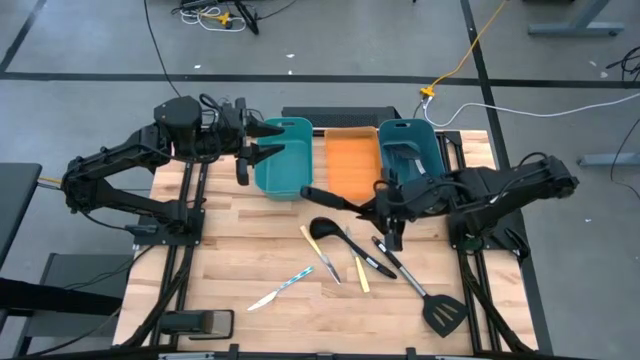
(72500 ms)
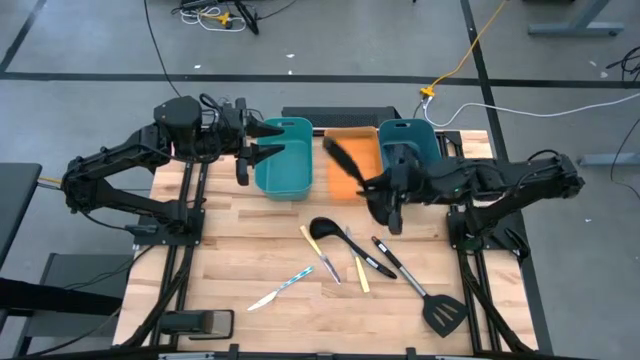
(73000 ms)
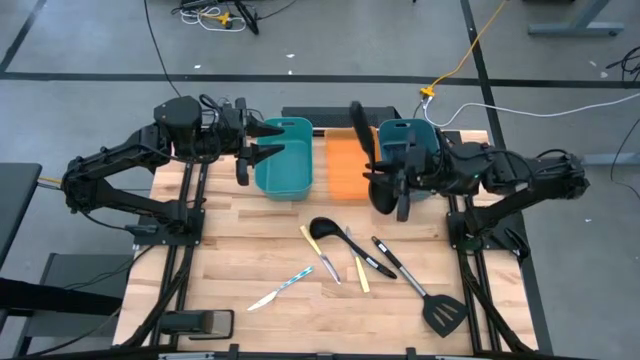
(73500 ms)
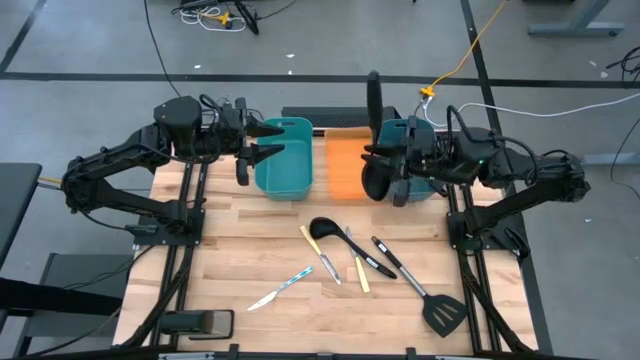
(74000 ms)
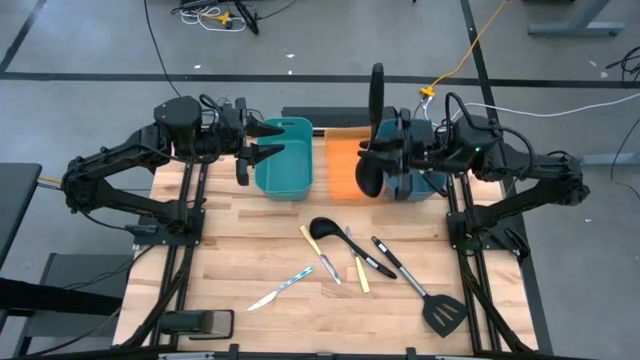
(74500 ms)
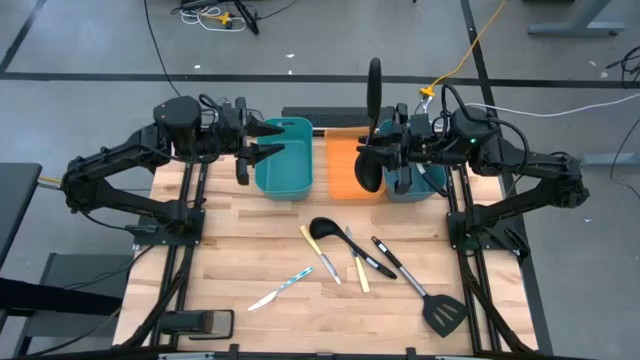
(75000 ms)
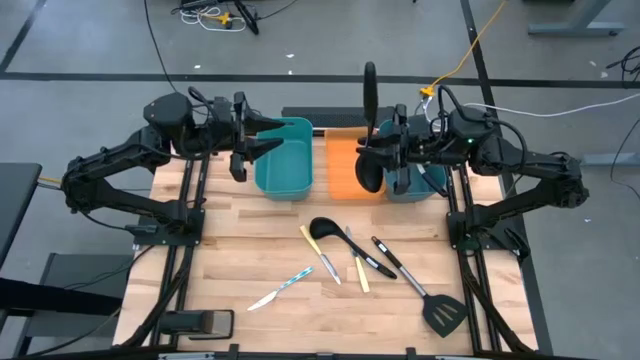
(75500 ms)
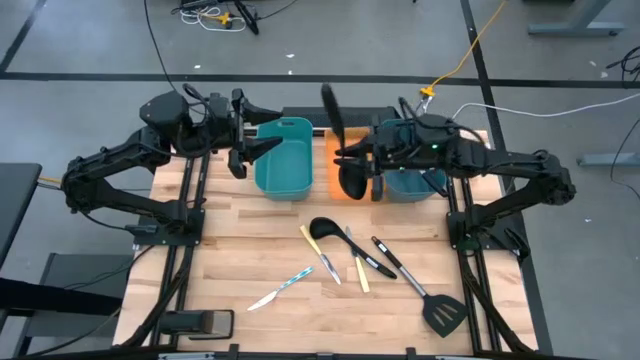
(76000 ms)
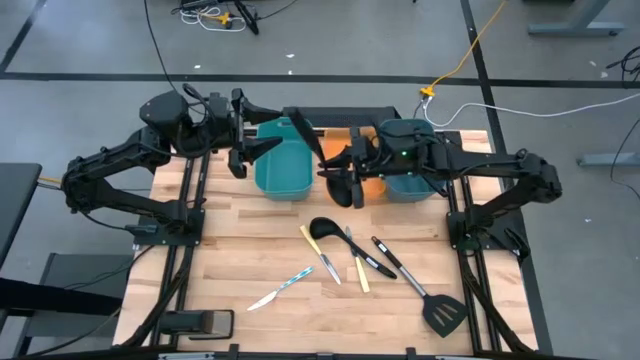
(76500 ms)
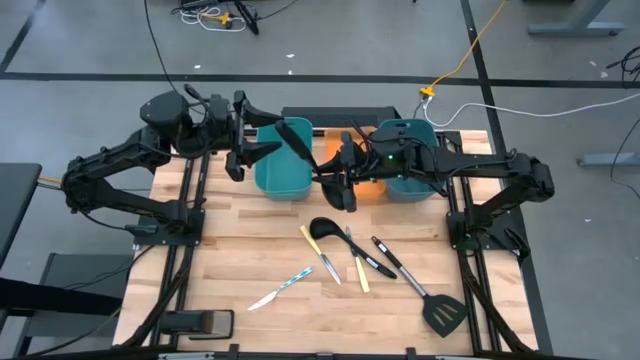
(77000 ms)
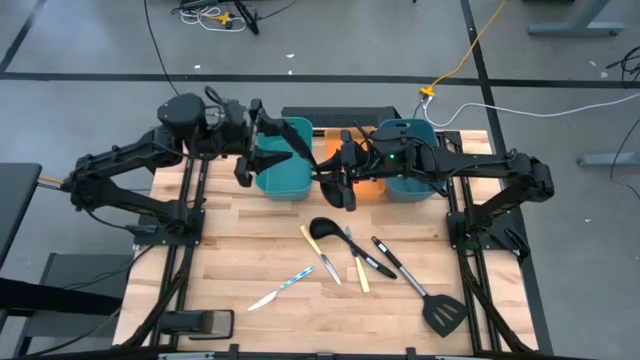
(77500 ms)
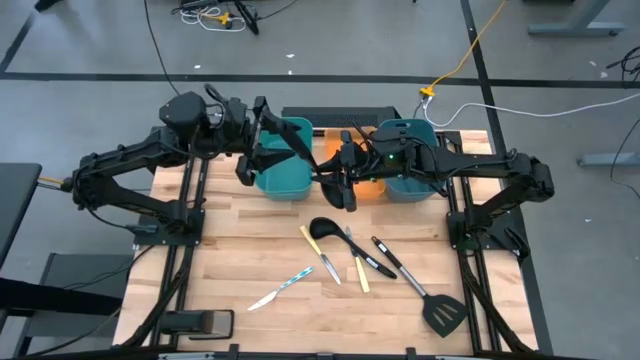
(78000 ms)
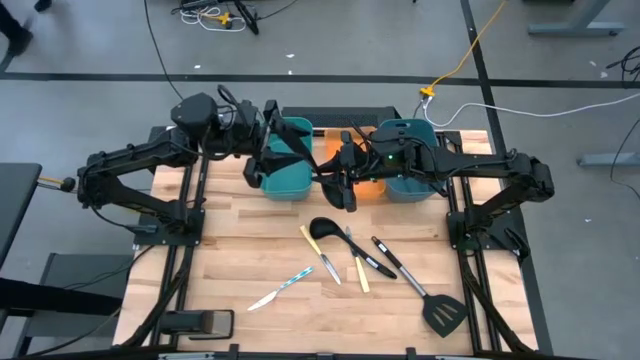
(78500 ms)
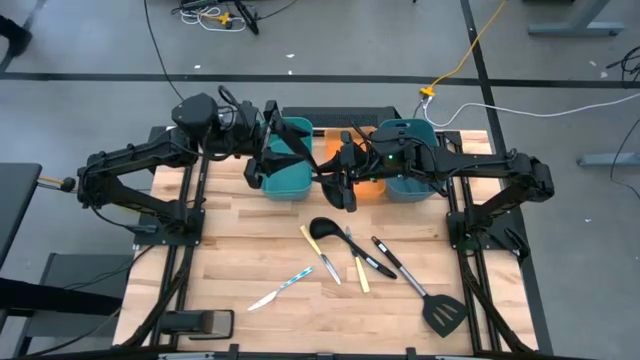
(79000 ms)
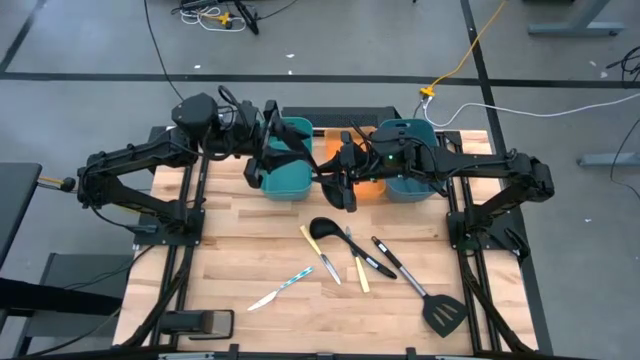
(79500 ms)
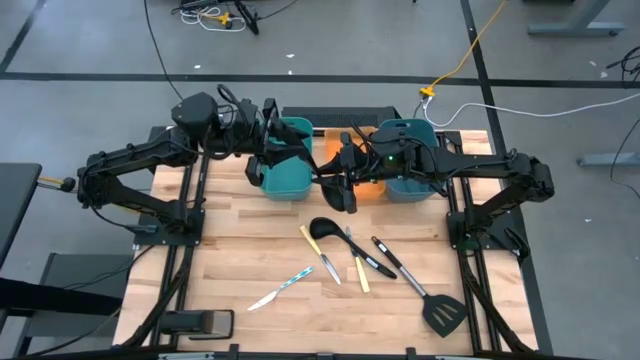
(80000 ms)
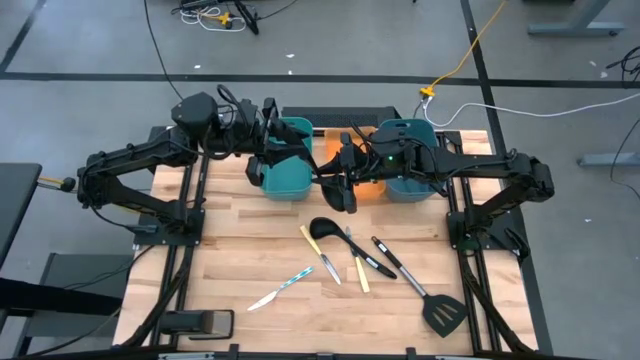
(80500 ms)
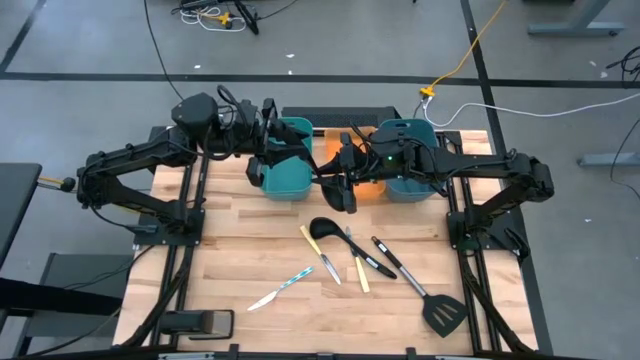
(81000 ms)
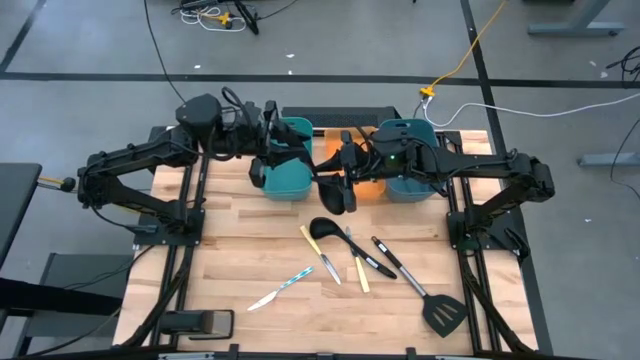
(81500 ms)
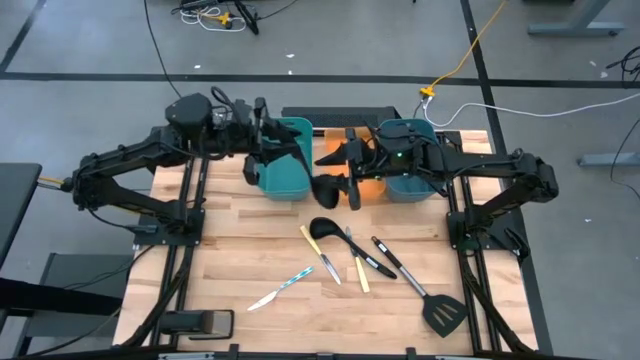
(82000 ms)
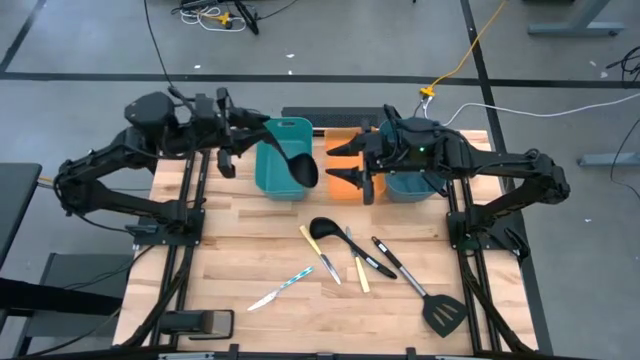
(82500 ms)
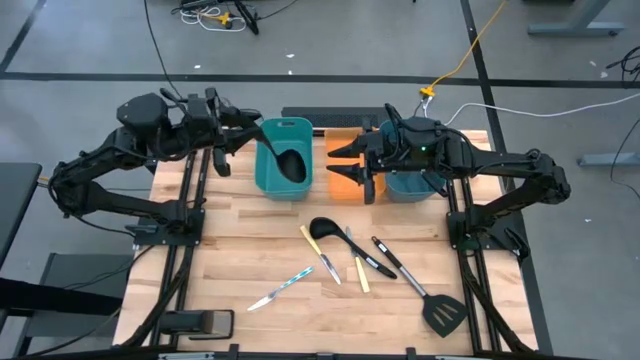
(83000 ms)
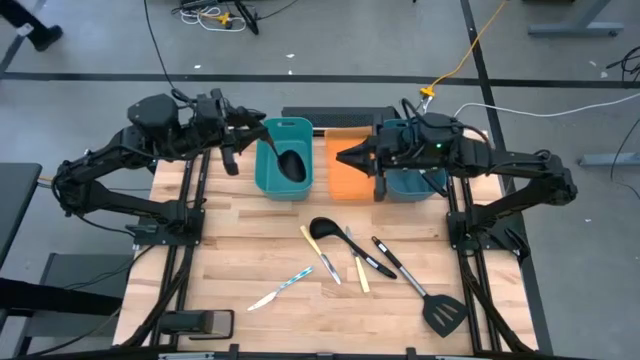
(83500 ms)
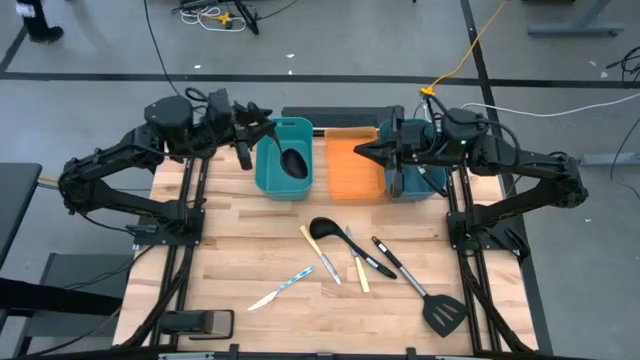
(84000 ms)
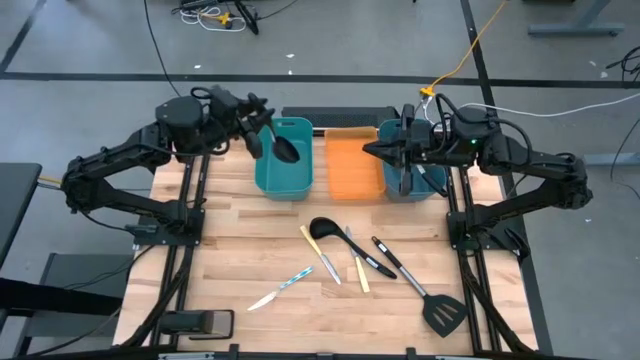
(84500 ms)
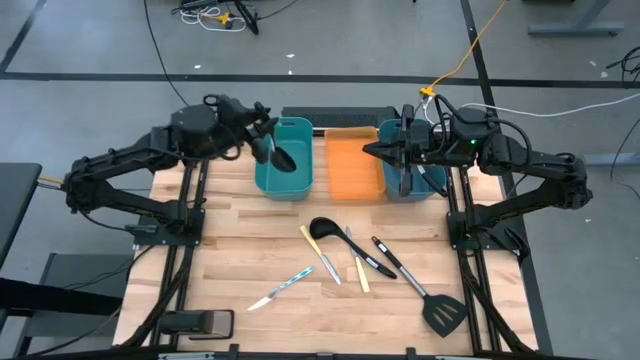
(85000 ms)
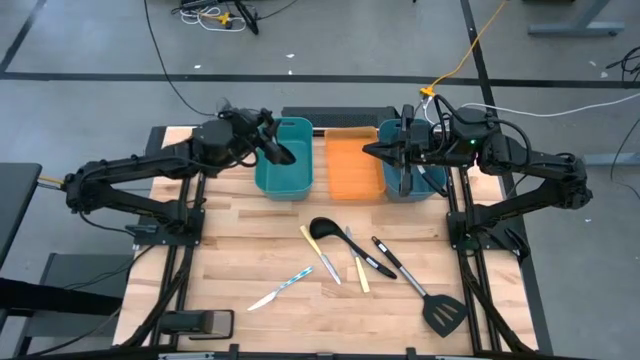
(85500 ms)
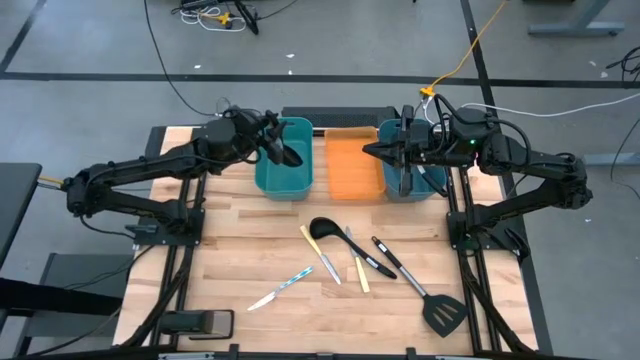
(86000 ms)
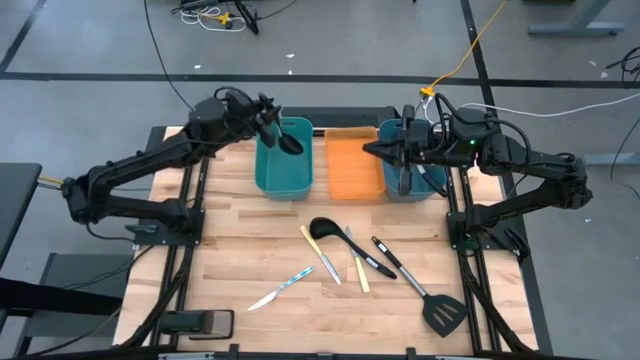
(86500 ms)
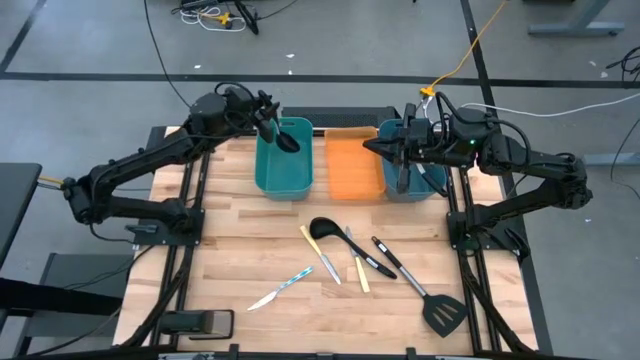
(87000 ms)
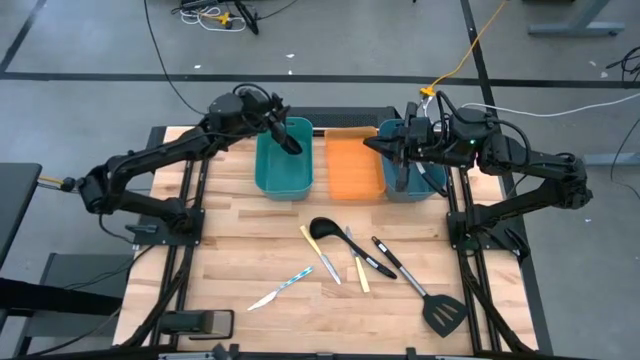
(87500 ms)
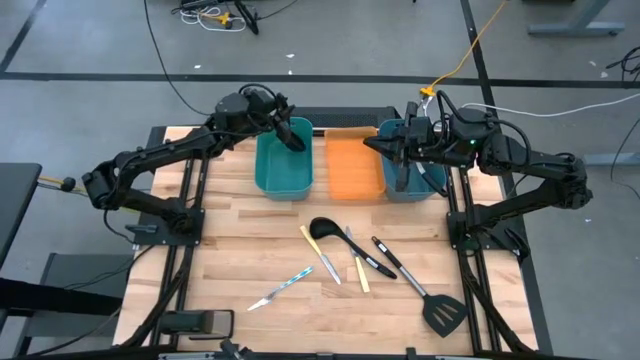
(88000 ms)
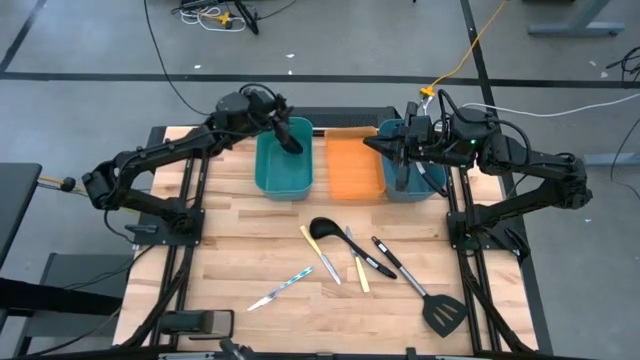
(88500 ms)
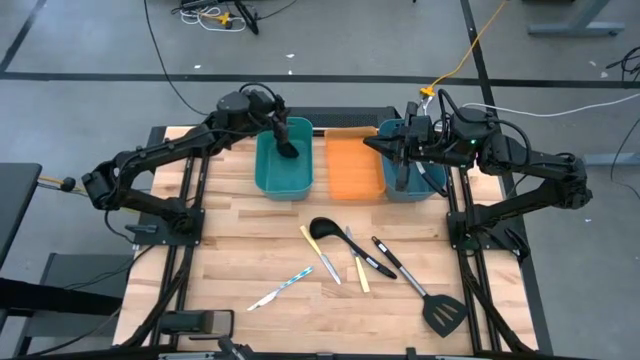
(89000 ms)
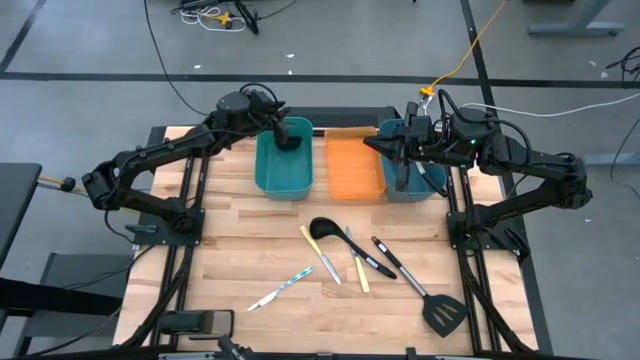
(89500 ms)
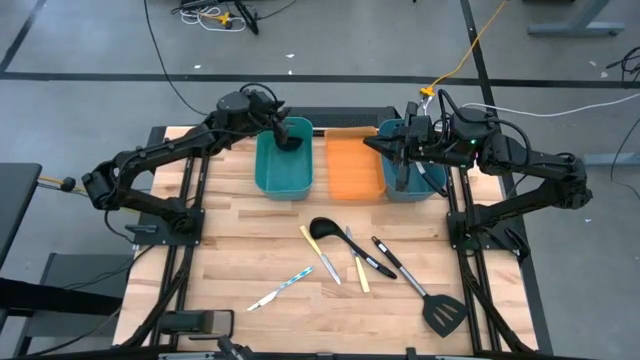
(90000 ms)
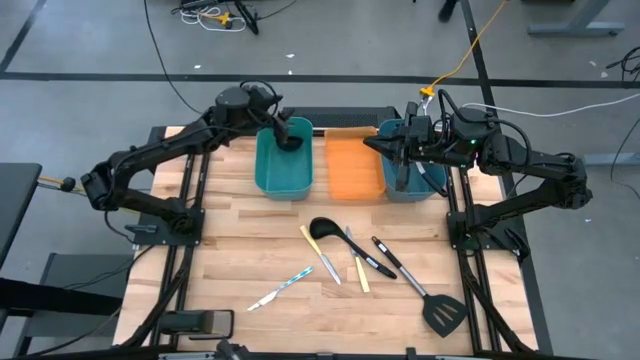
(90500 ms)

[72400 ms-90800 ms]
Task: Pick & Place Kitchen Items
Put the right black serving spoon into the light green bin
